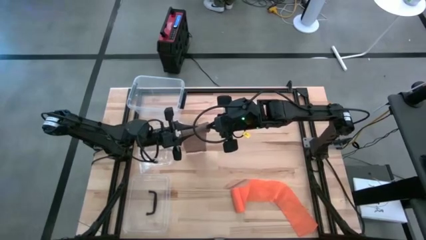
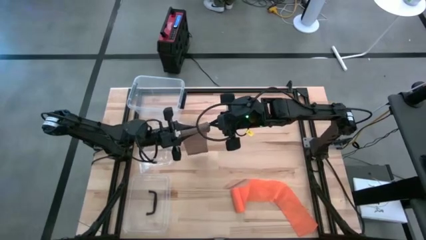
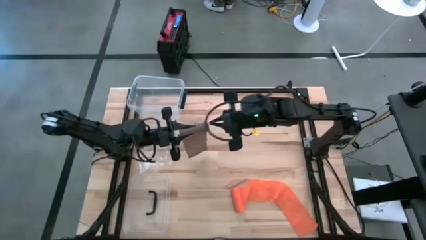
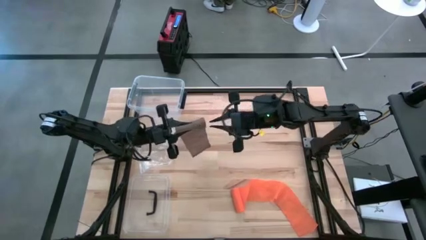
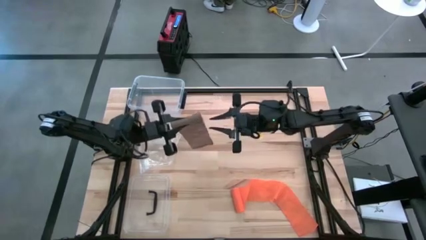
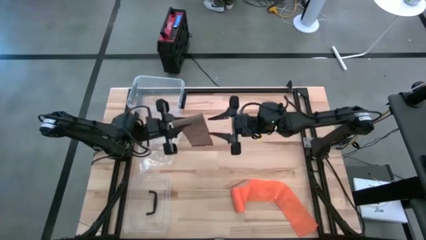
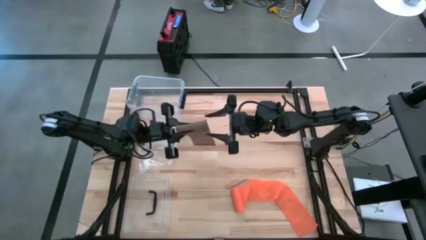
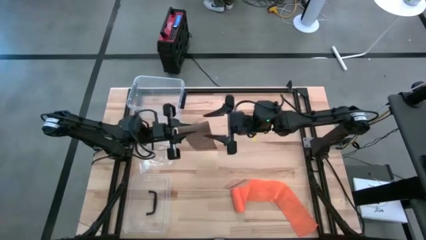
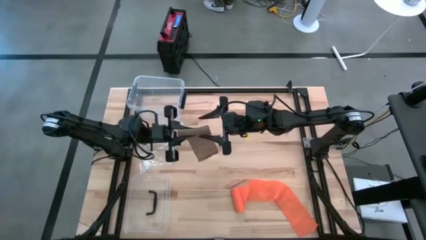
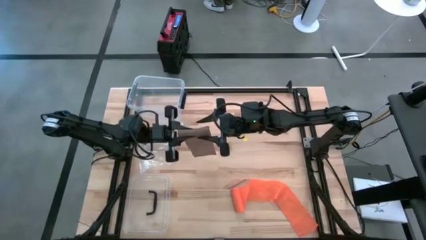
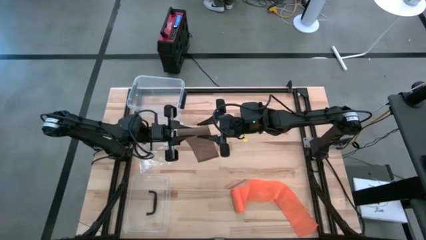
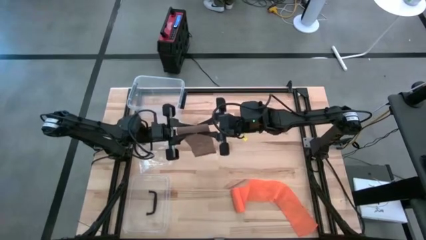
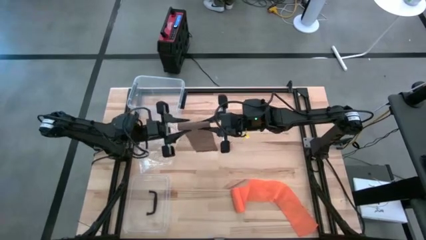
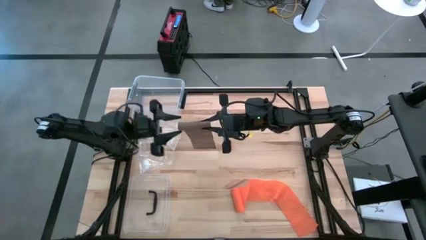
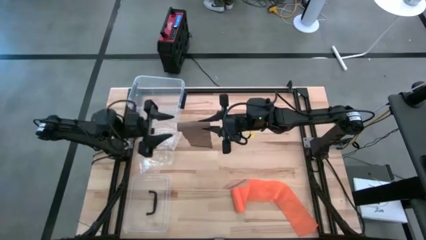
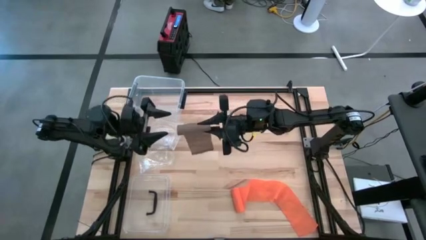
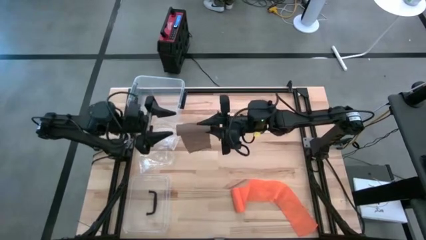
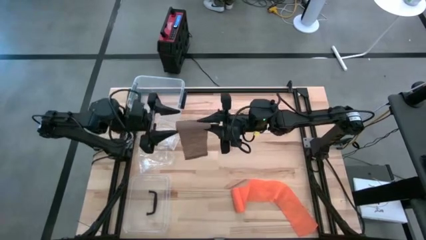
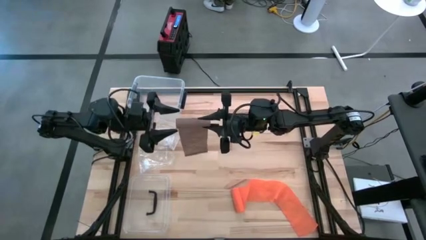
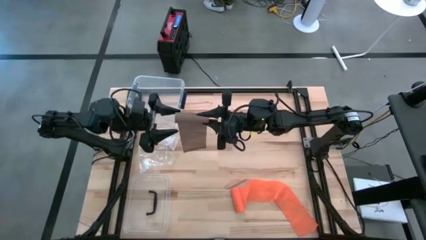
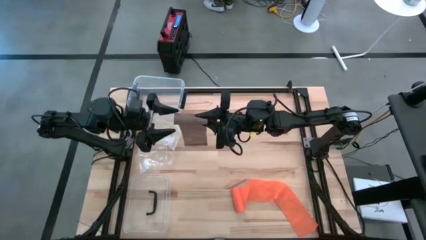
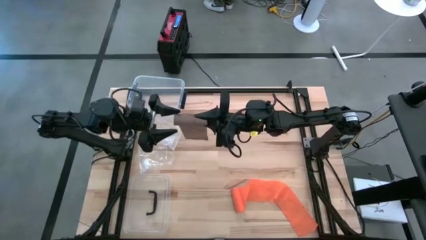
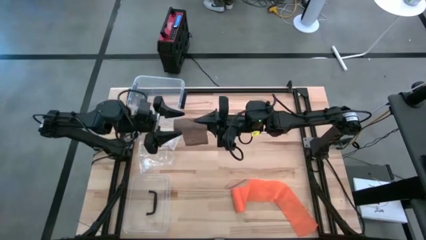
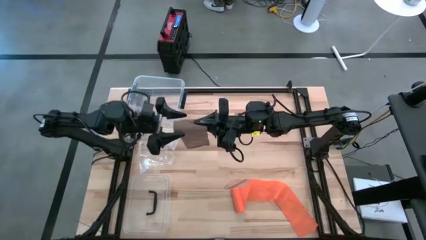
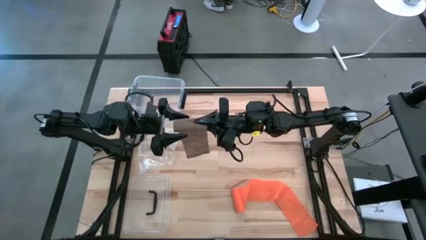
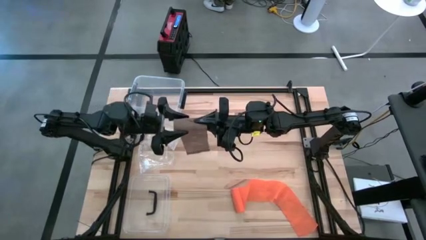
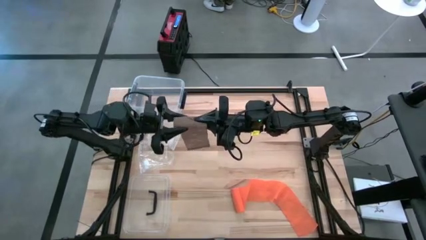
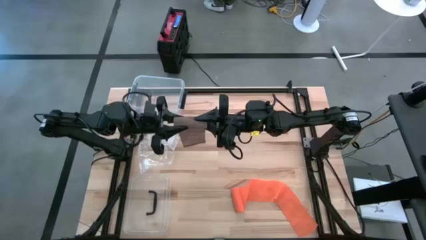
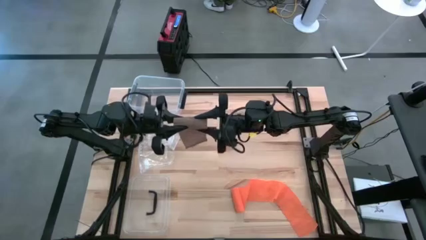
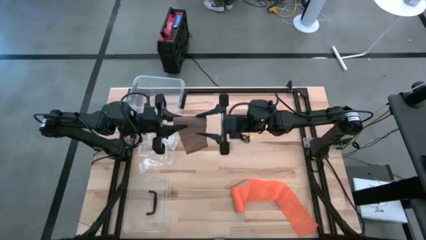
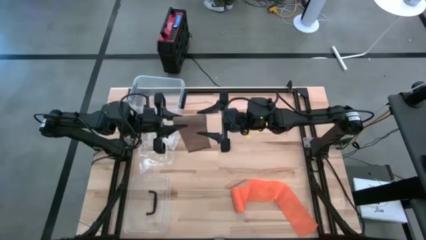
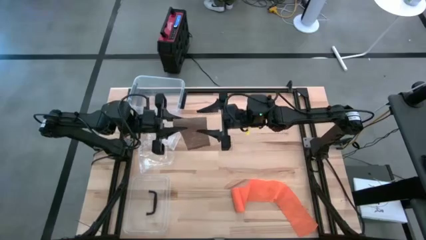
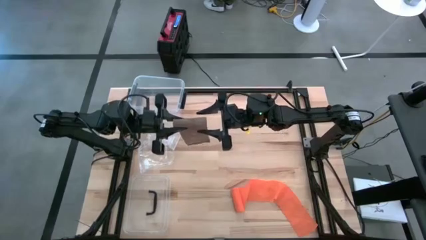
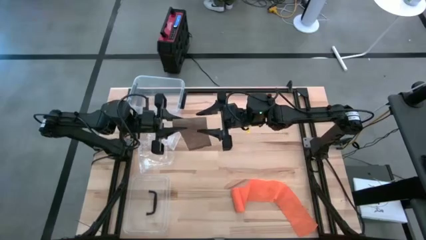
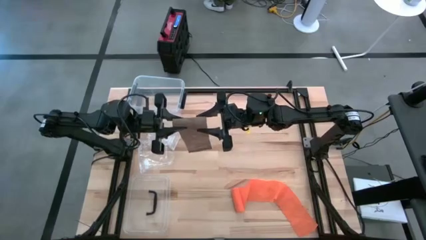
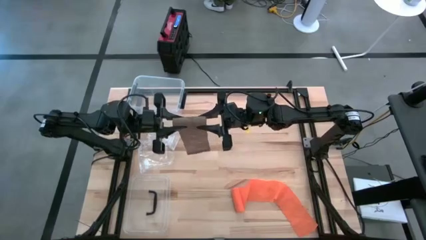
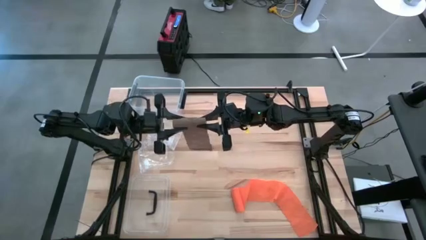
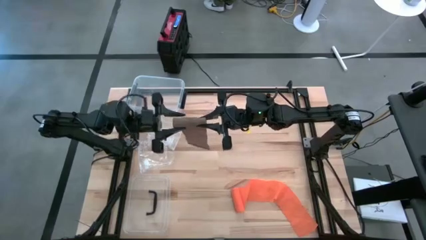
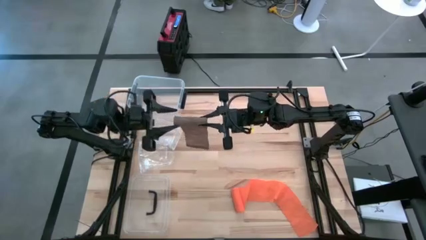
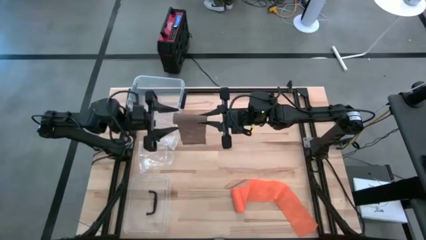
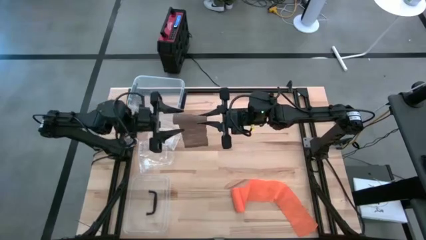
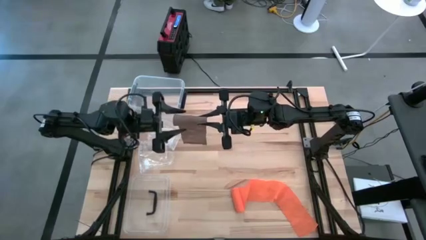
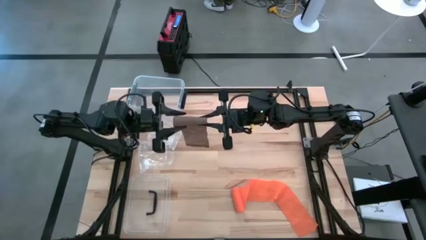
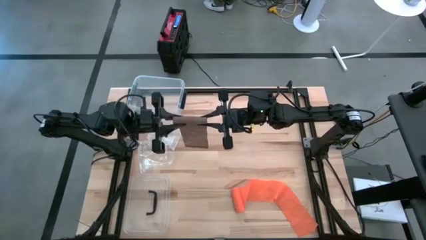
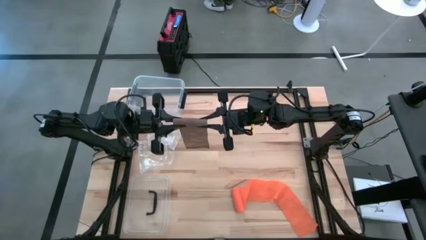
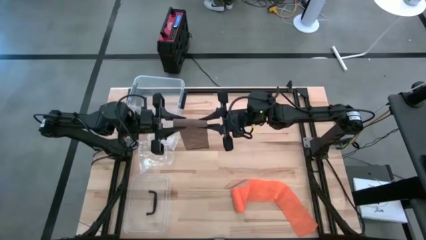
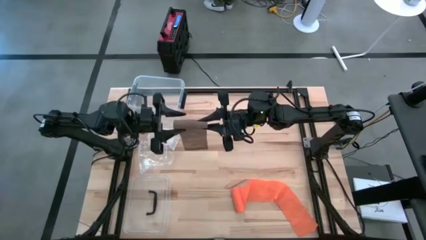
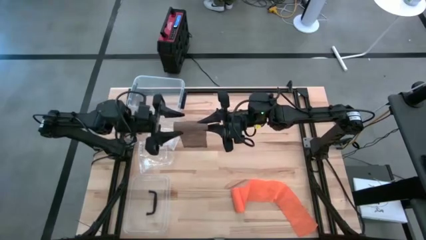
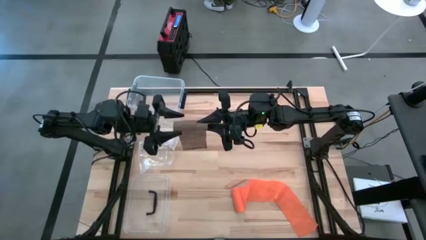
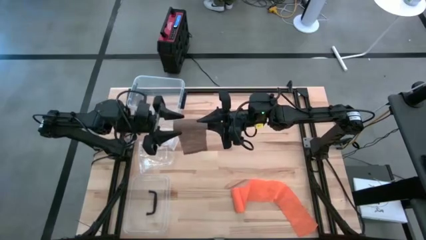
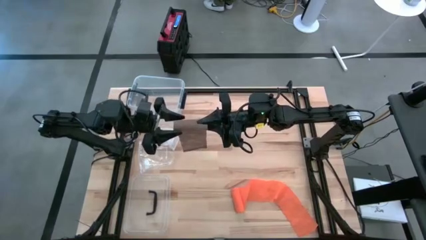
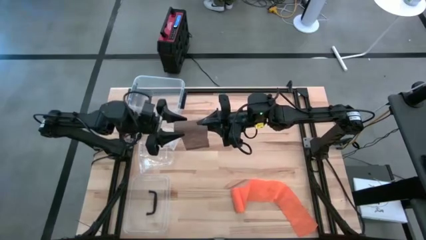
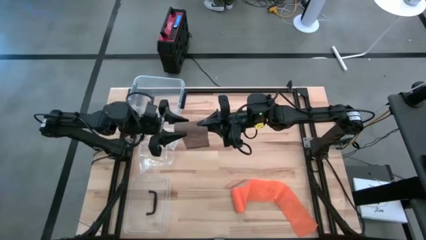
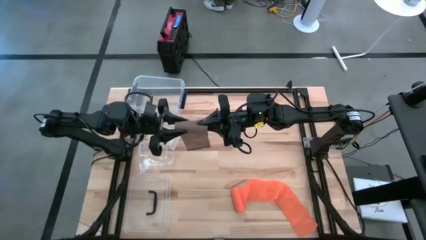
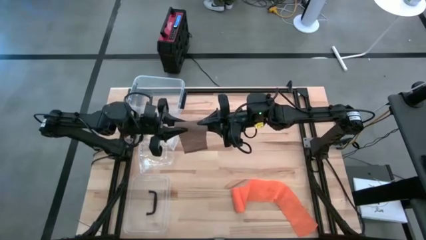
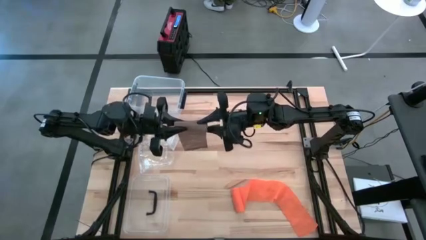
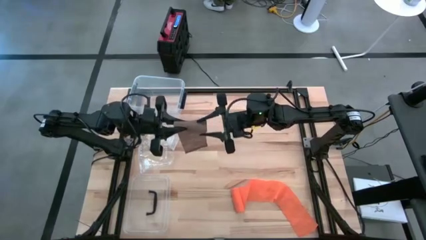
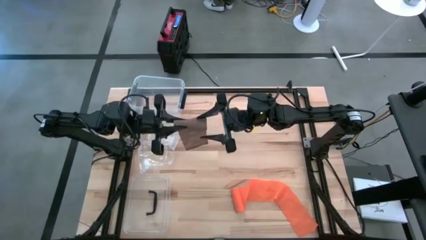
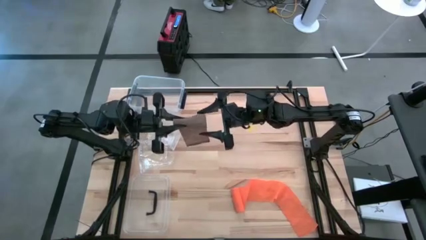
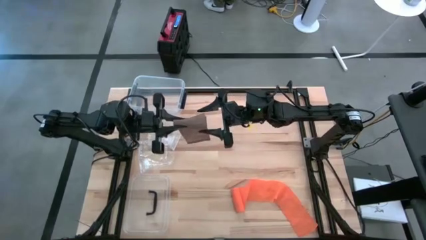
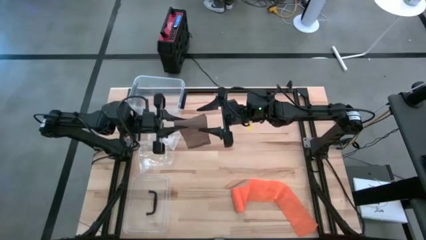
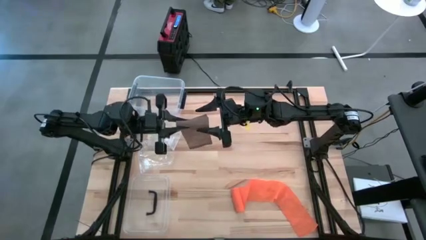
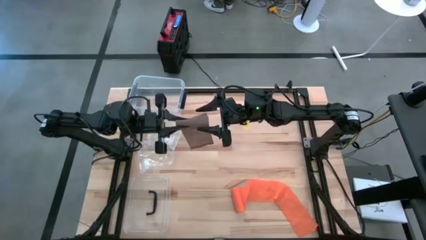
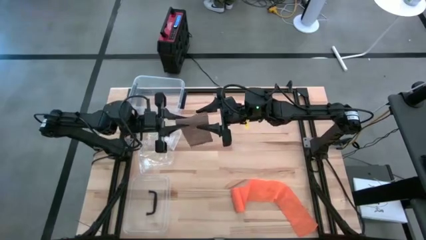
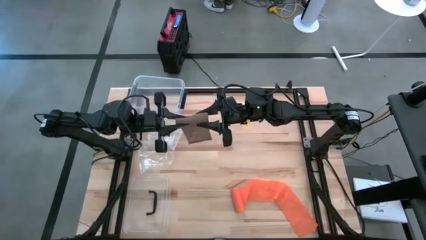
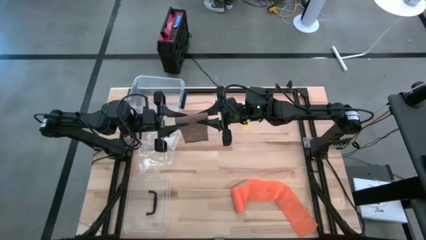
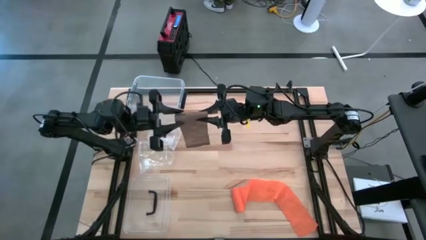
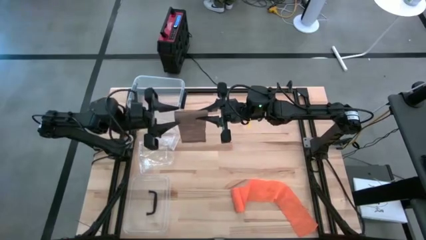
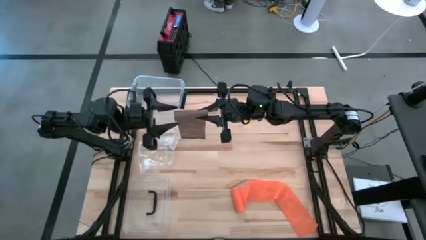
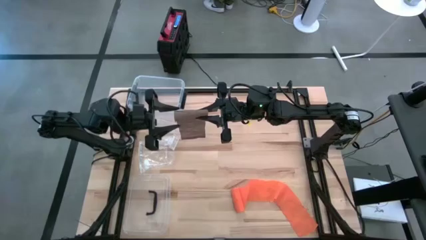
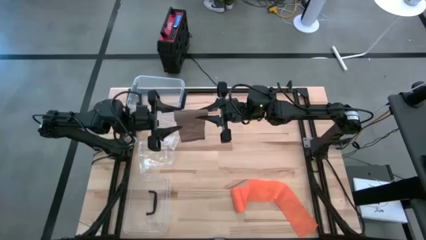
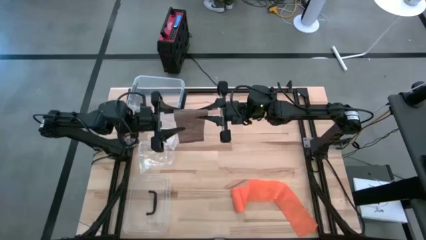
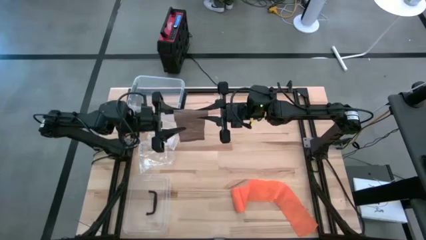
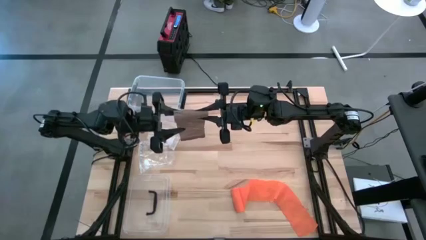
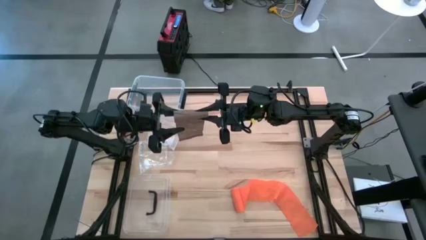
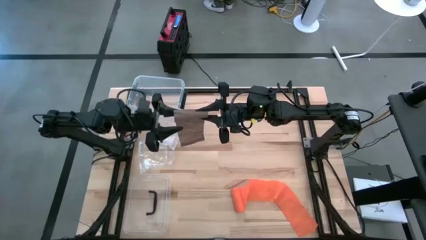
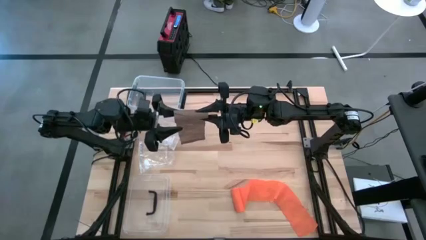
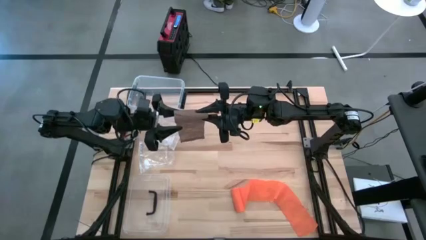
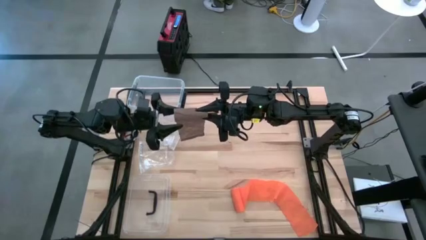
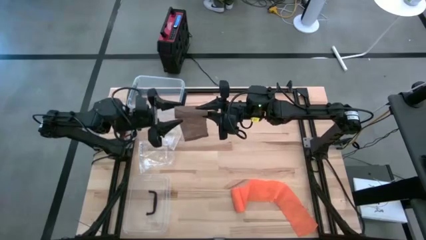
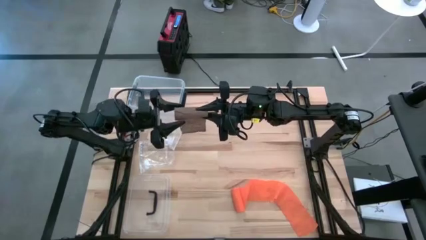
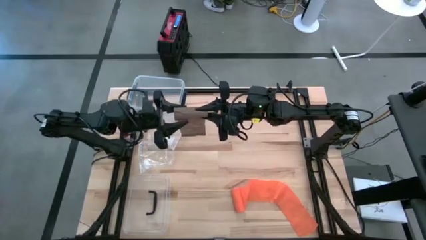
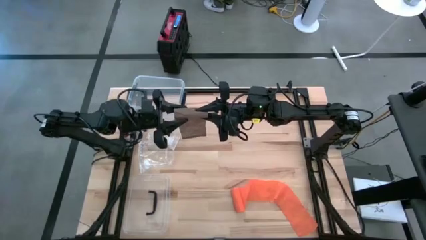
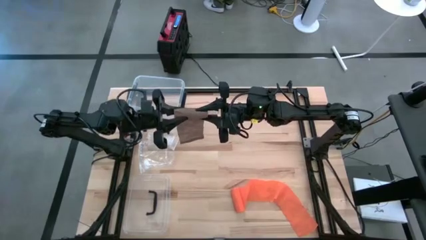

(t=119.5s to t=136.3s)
Task: Roll bandage
Roll the brown bandage
